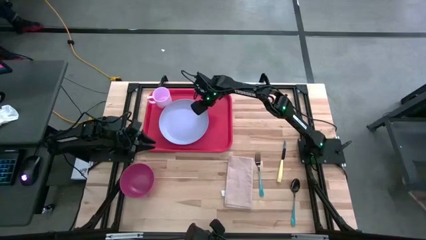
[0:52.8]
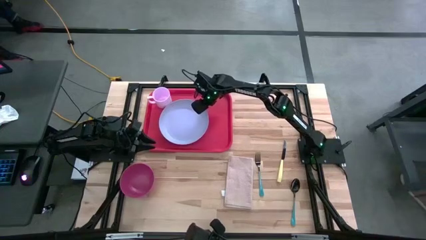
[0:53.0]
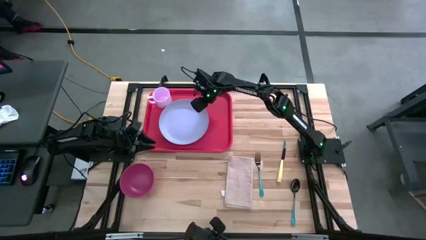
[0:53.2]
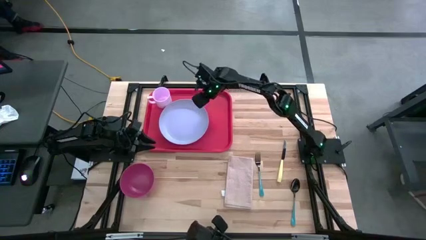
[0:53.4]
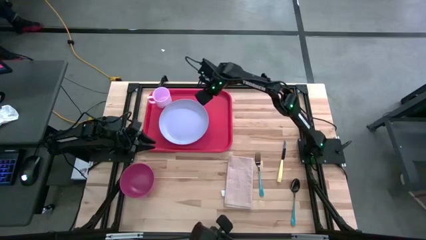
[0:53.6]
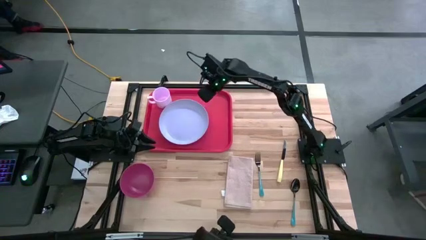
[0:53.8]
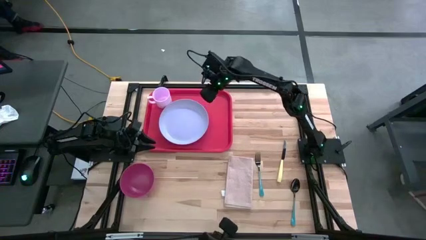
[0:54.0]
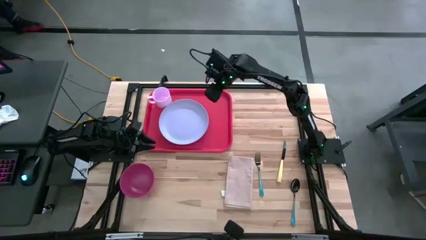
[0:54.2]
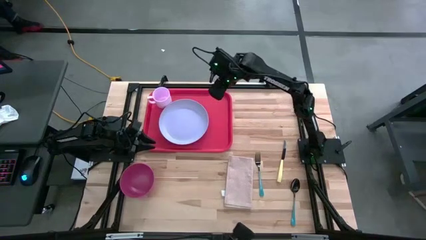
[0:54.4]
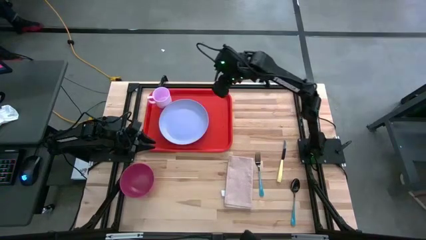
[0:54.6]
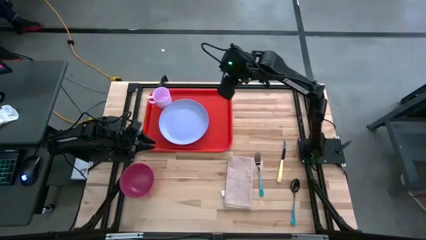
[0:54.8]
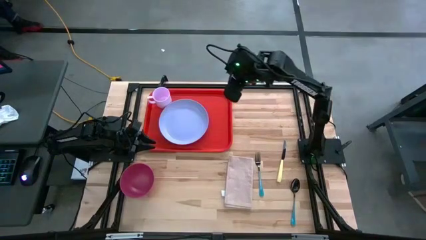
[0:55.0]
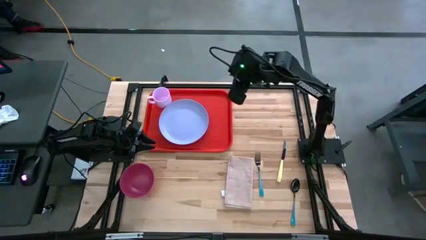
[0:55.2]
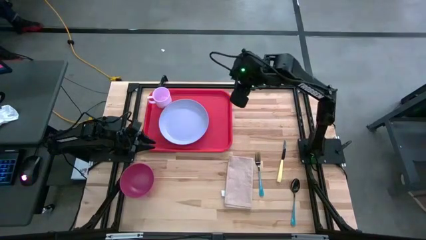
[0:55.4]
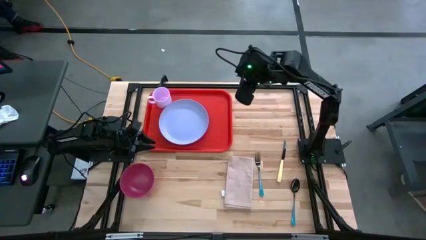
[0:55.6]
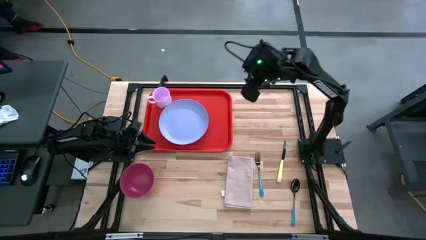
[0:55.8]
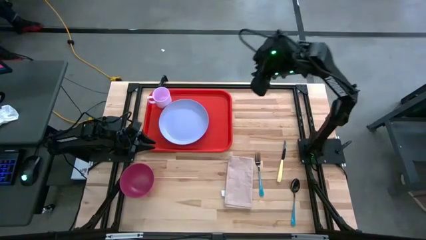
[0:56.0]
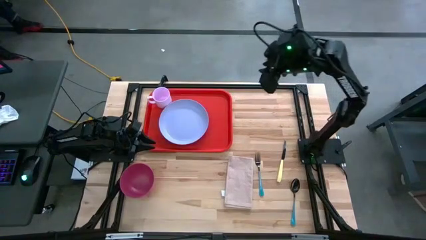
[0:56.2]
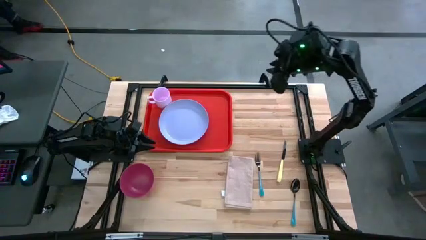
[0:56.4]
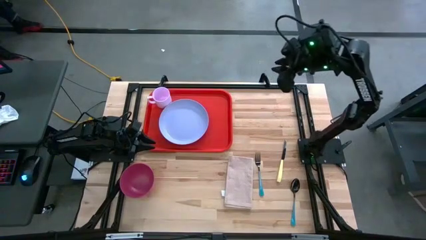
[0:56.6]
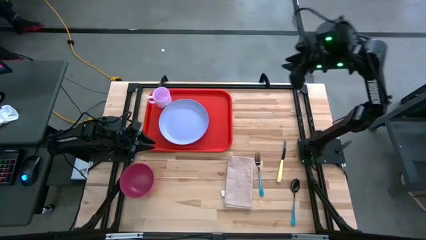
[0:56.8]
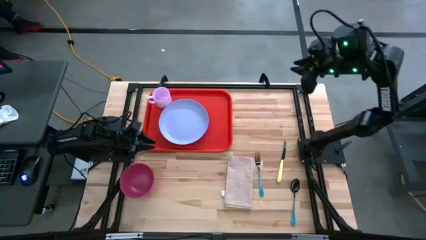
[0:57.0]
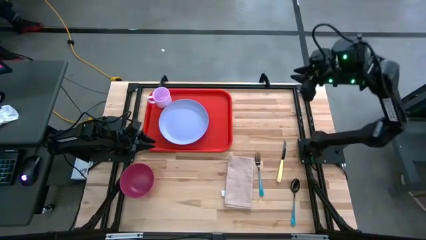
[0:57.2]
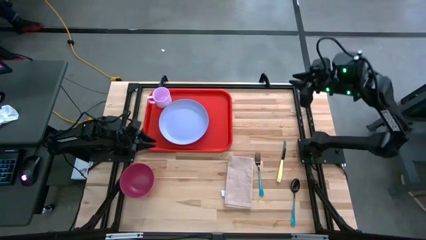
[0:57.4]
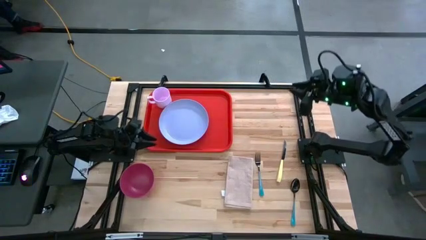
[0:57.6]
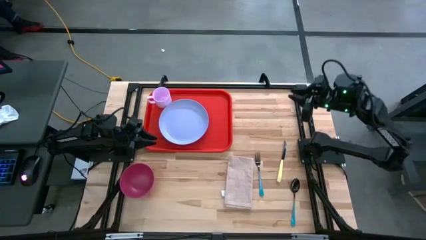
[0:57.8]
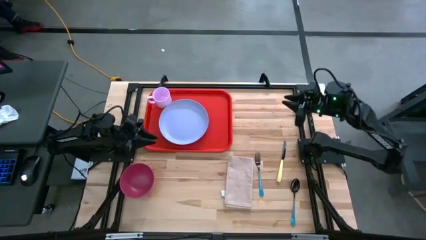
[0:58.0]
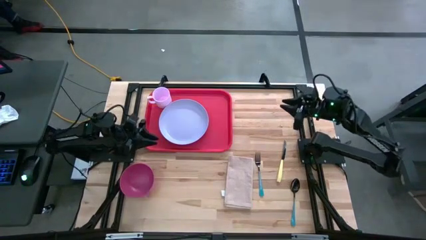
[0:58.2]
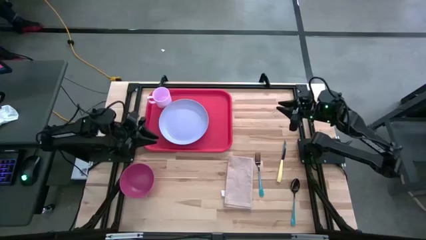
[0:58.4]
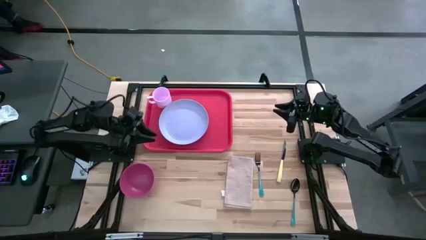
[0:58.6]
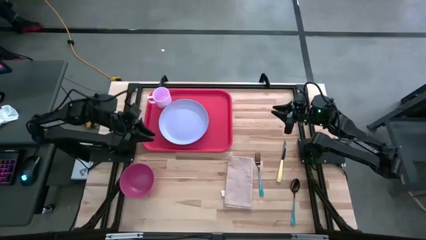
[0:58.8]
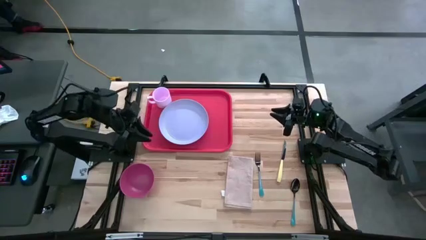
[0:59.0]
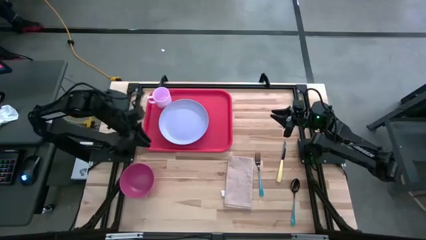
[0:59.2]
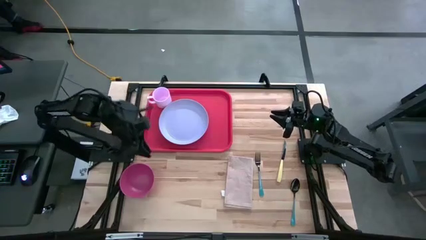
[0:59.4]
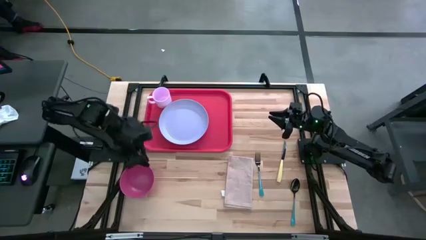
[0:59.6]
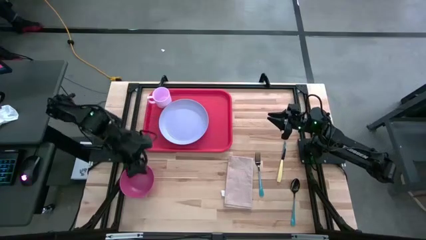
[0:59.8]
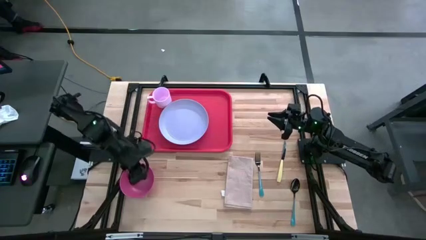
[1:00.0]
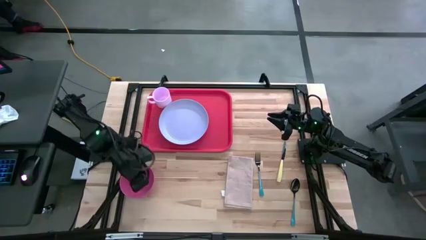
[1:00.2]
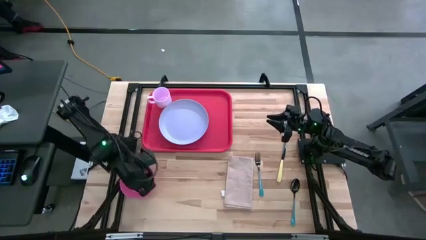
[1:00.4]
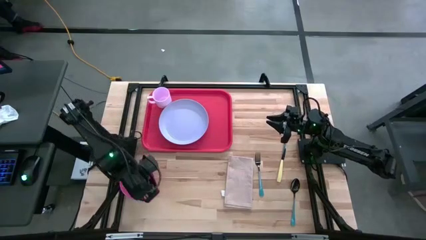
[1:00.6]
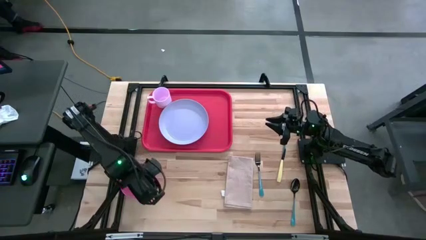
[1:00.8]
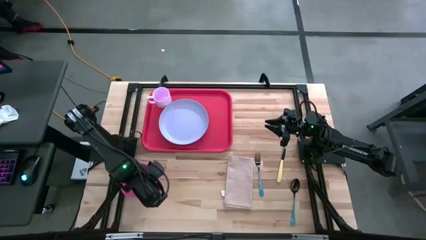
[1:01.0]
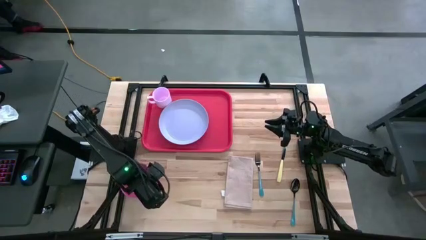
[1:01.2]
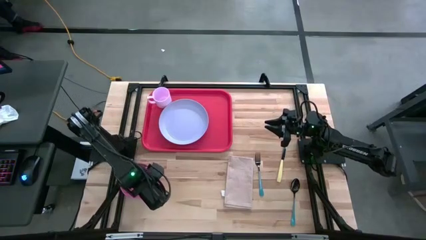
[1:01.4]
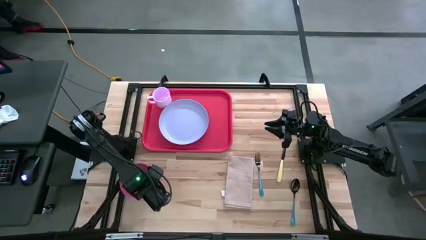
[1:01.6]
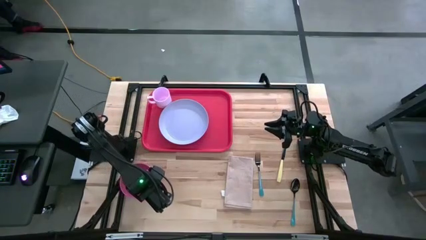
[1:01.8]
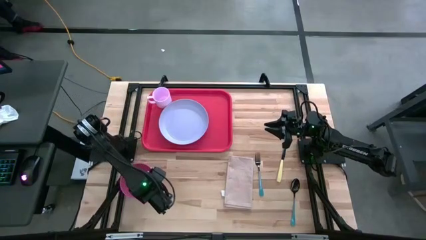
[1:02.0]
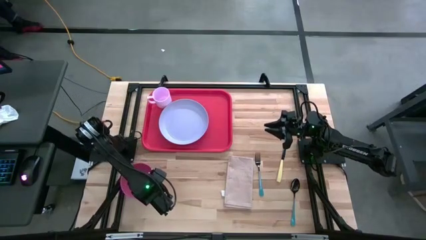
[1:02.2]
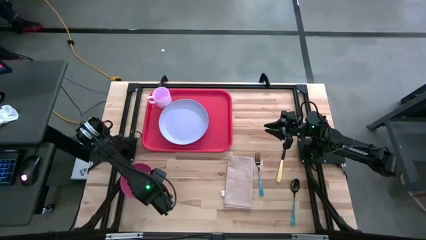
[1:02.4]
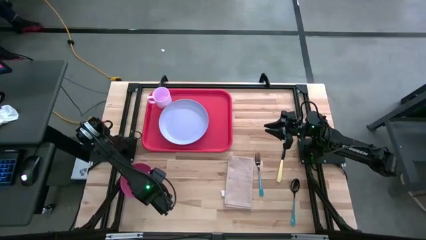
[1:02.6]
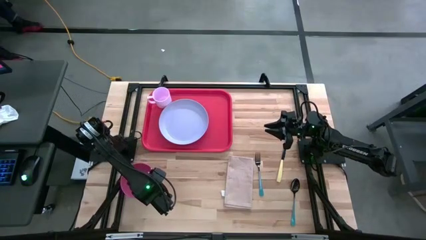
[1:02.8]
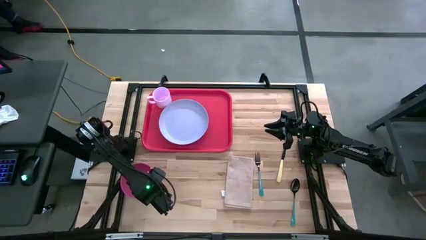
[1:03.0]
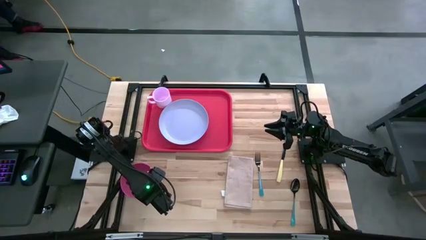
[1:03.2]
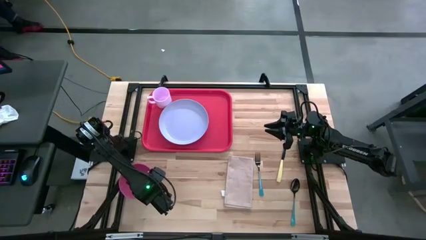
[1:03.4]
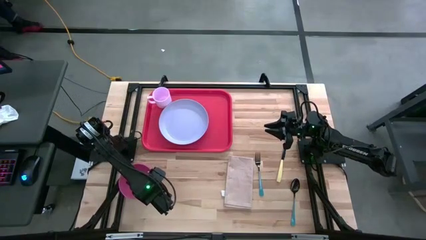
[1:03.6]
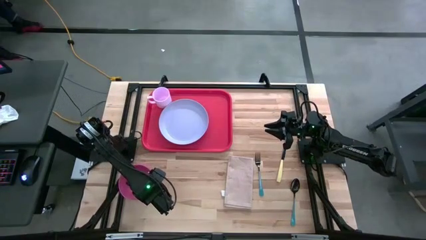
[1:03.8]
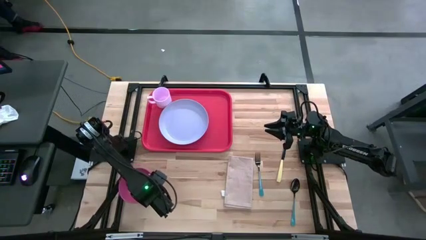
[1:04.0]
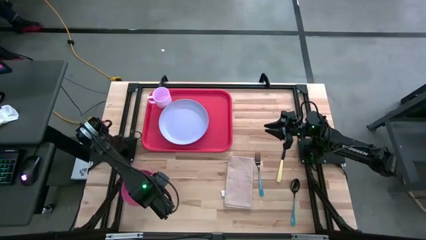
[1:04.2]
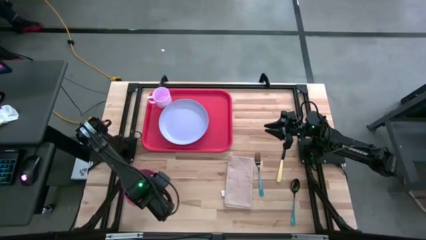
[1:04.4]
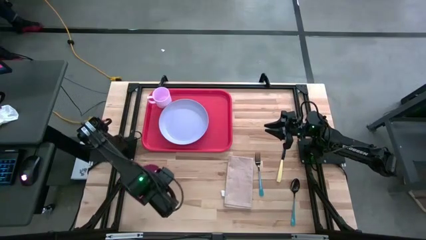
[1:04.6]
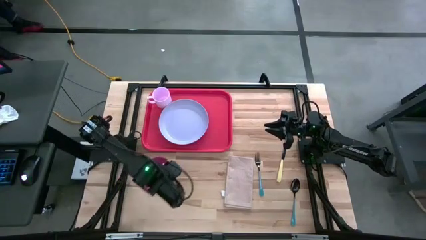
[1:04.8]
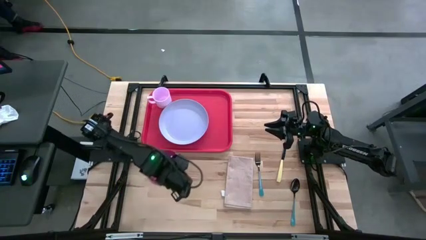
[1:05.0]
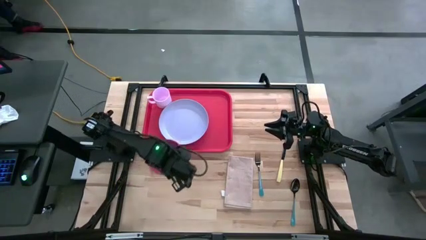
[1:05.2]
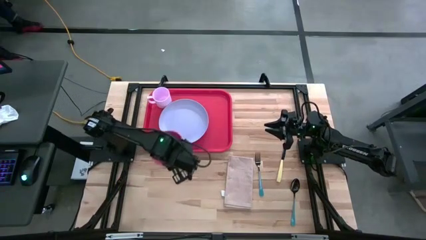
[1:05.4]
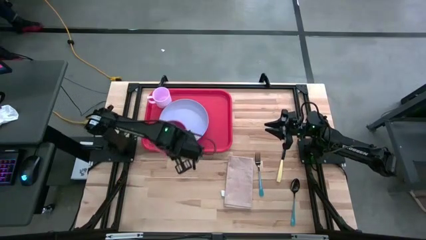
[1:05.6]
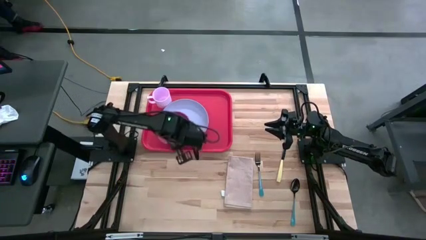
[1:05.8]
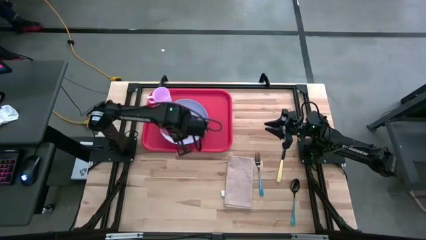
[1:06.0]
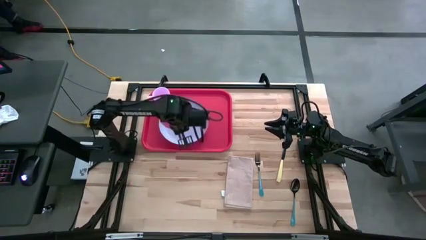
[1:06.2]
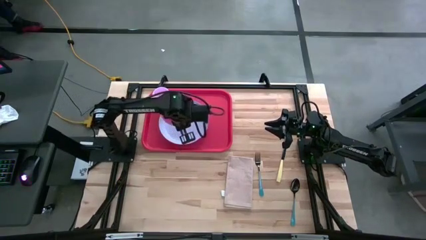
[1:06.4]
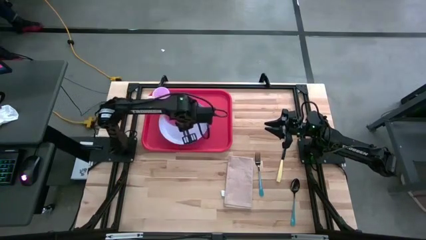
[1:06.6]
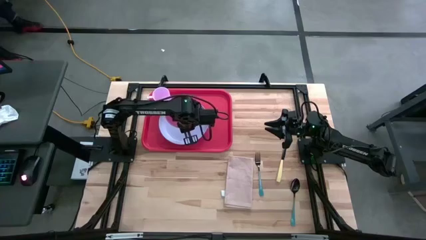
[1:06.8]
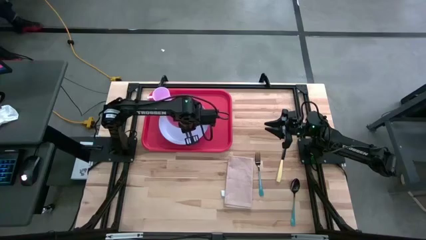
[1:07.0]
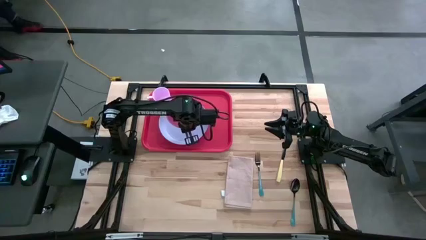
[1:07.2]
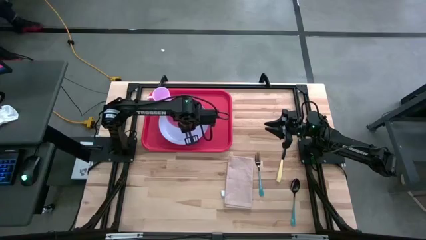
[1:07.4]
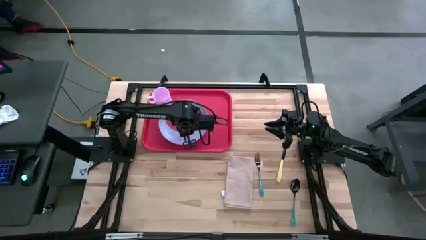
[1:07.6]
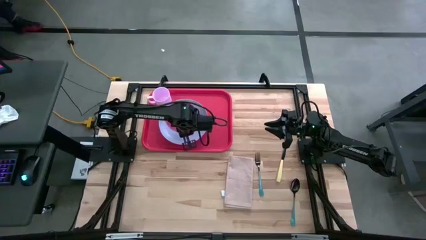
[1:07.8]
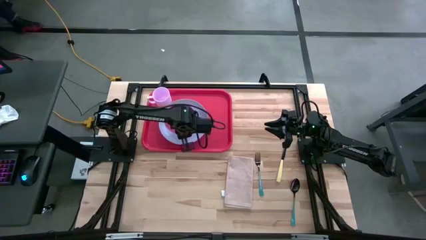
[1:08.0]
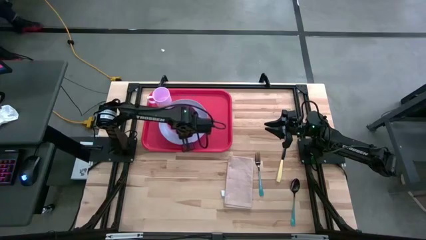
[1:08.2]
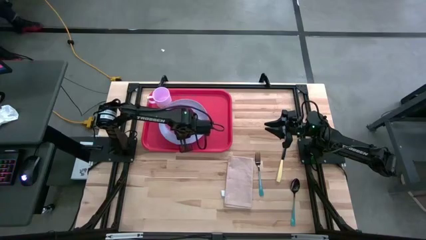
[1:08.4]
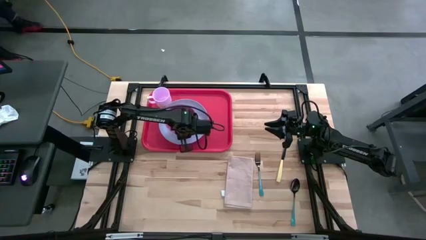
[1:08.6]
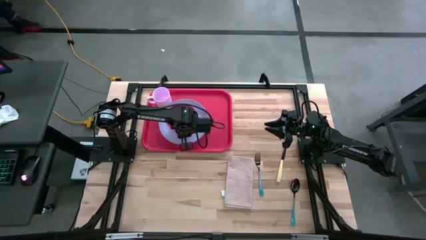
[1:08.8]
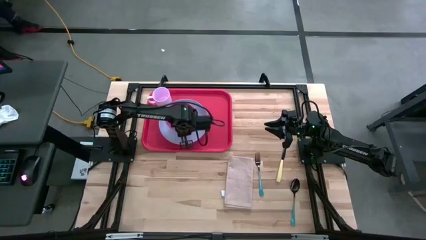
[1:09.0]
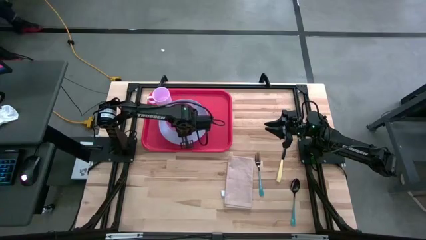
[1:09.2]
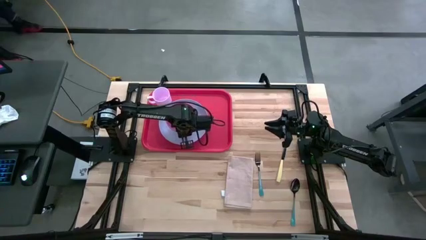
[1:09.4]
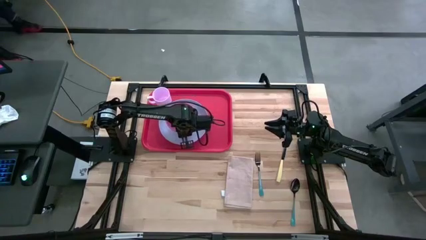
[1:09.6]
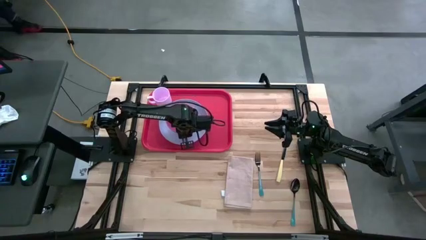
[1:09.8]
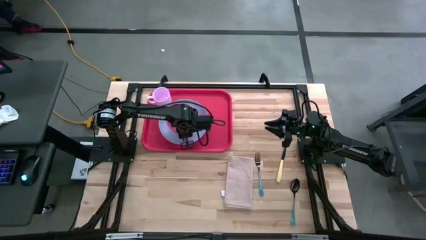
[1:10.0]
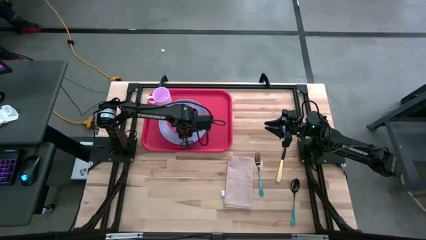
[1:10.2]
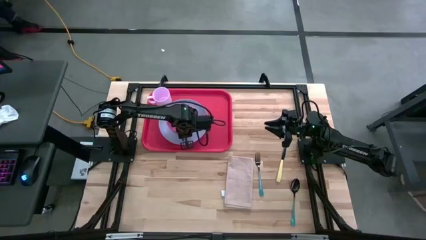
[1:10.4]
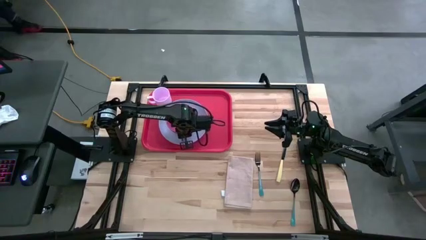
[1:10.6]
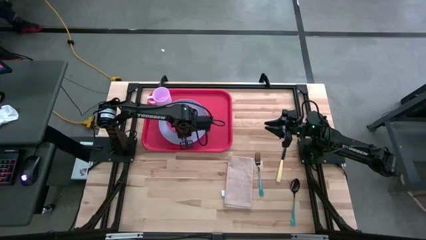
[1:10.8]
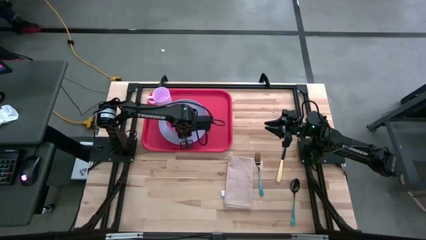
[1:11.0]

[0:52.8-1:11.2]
Task: Set up tray
Put the pink bowl on top of the blue plate on the red tray
